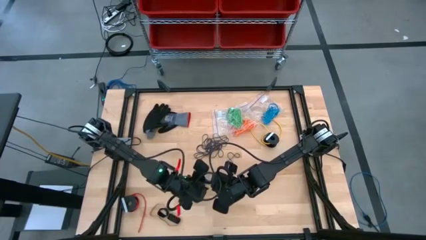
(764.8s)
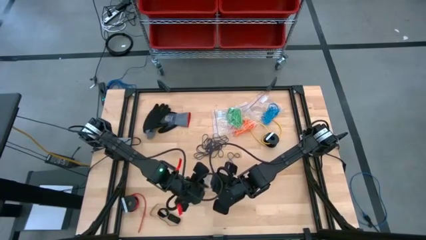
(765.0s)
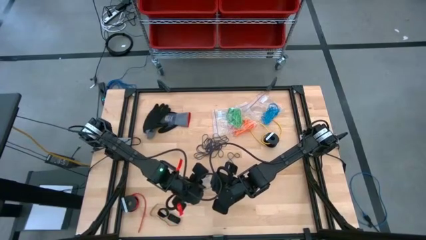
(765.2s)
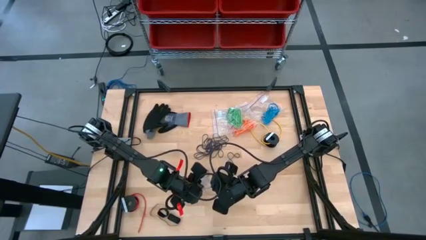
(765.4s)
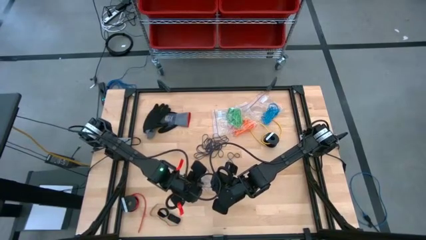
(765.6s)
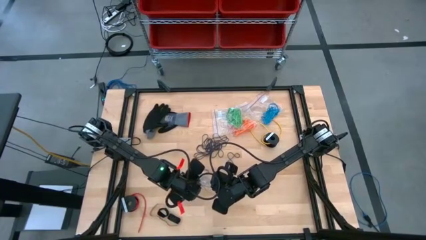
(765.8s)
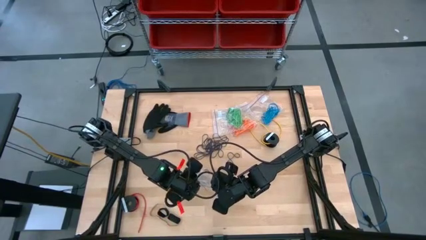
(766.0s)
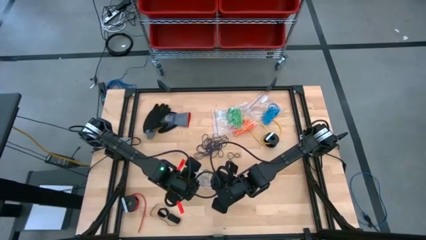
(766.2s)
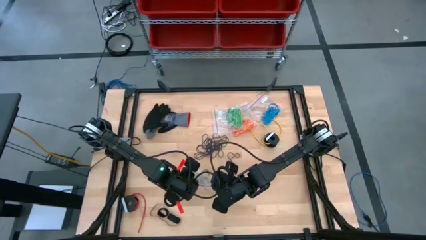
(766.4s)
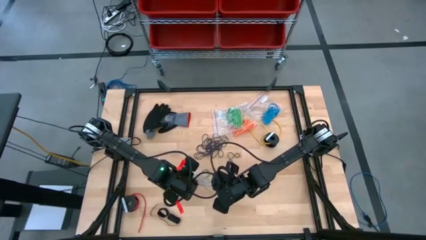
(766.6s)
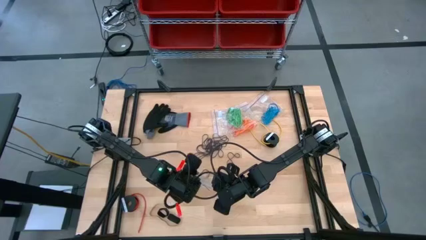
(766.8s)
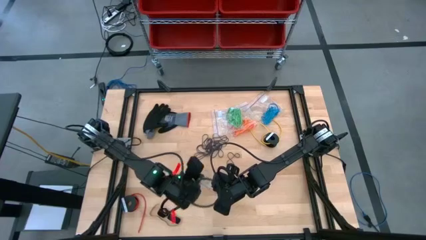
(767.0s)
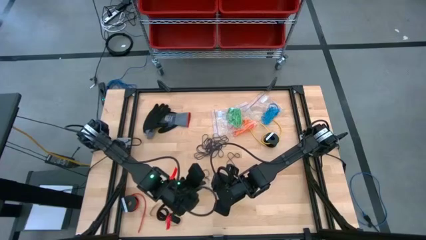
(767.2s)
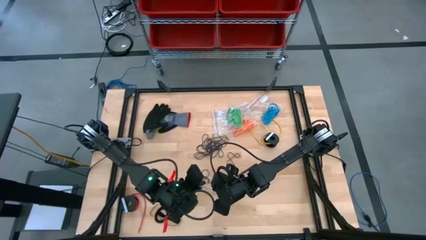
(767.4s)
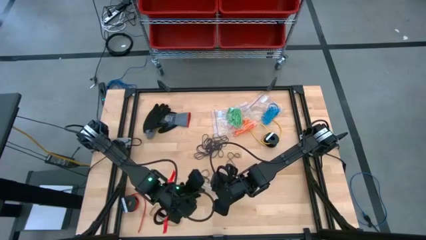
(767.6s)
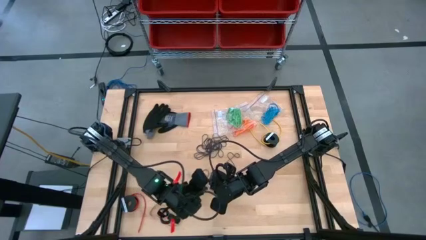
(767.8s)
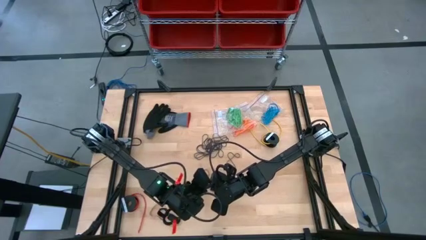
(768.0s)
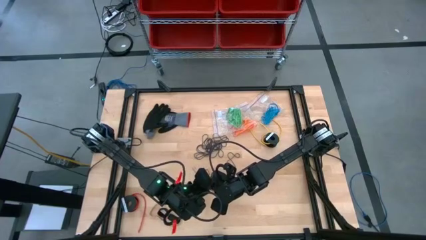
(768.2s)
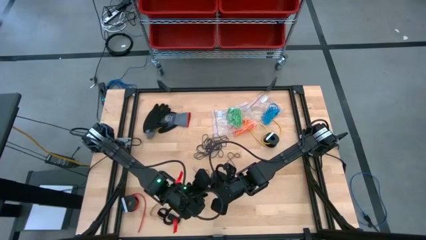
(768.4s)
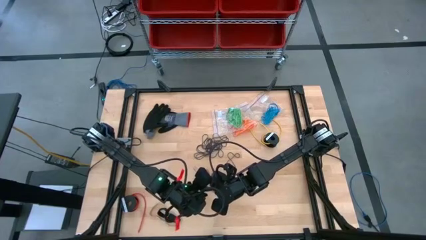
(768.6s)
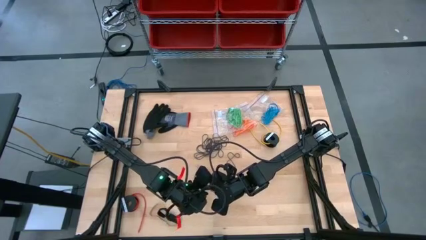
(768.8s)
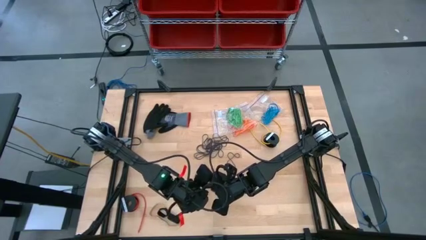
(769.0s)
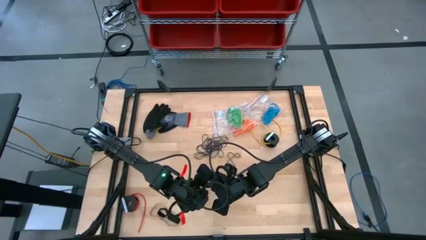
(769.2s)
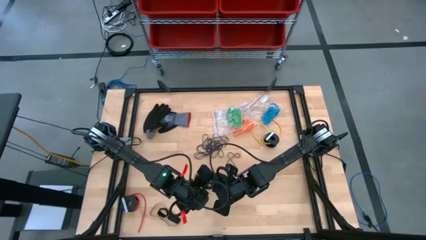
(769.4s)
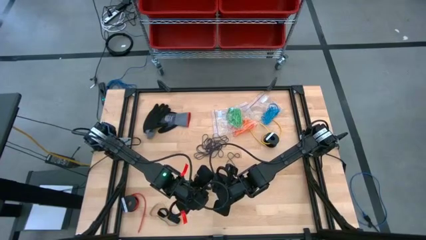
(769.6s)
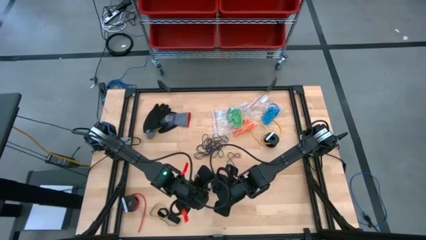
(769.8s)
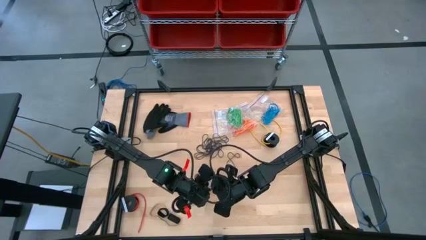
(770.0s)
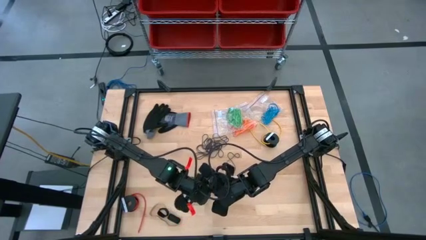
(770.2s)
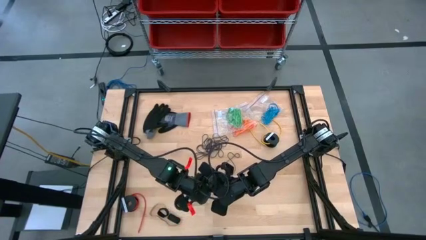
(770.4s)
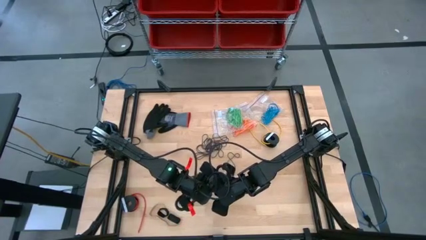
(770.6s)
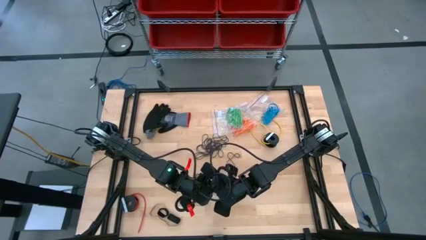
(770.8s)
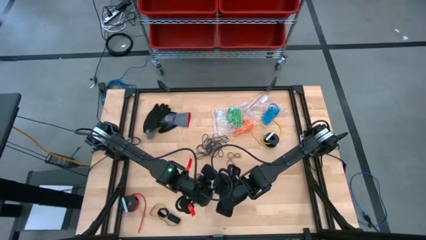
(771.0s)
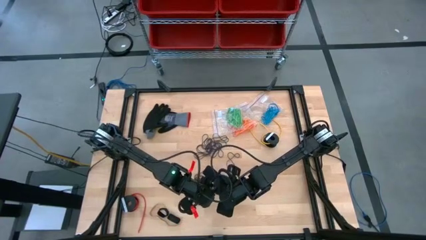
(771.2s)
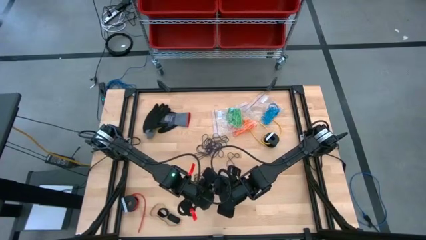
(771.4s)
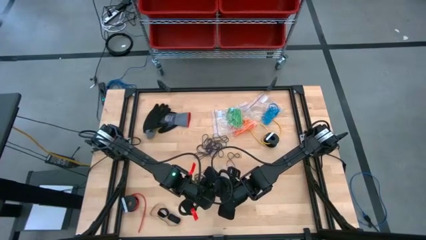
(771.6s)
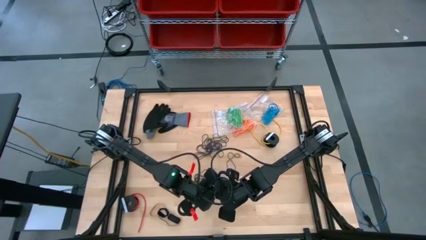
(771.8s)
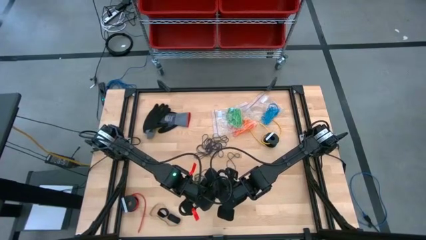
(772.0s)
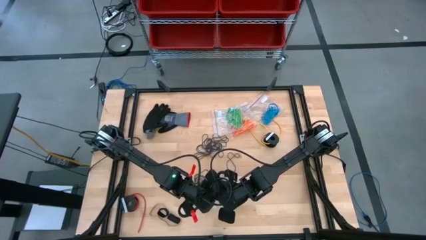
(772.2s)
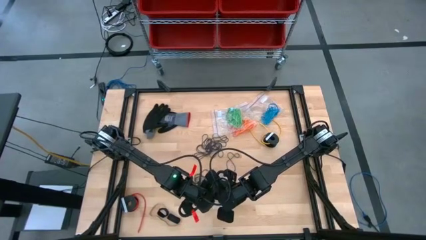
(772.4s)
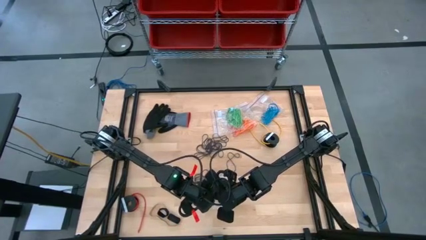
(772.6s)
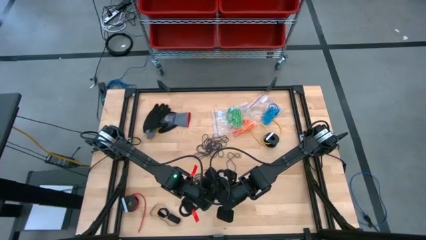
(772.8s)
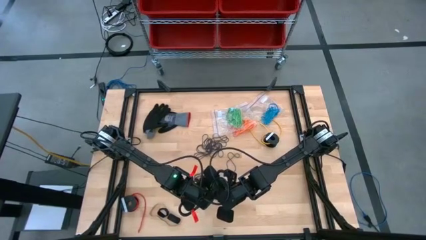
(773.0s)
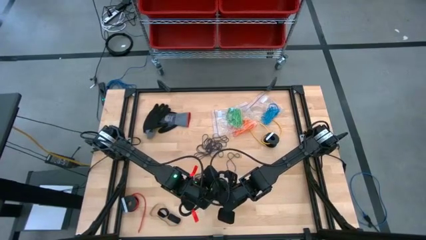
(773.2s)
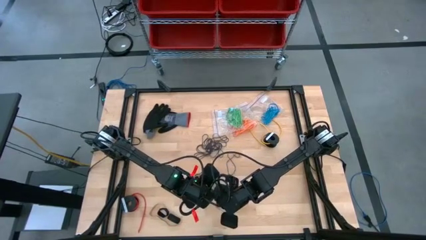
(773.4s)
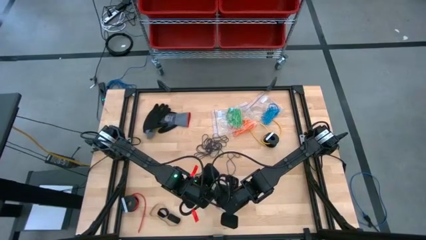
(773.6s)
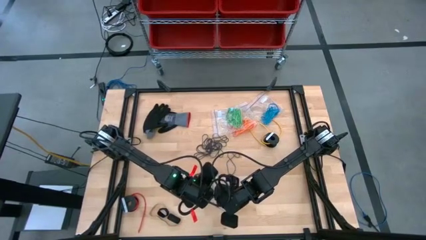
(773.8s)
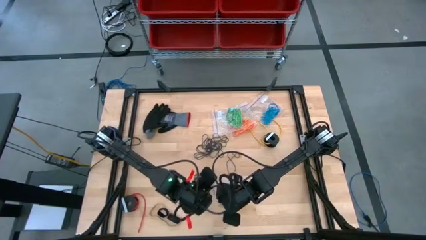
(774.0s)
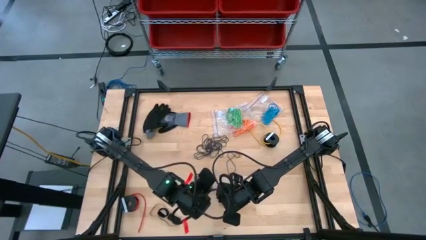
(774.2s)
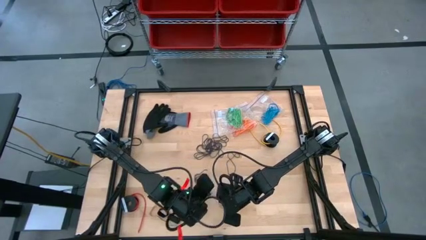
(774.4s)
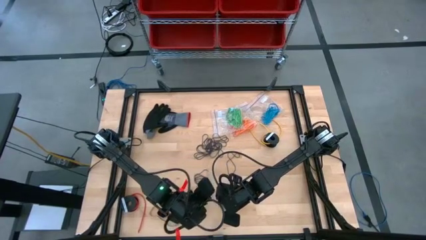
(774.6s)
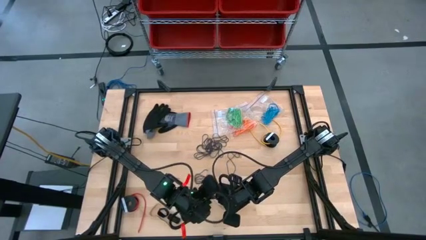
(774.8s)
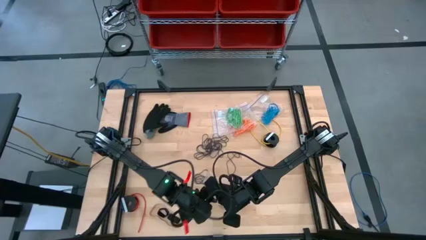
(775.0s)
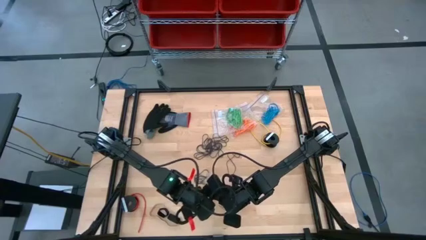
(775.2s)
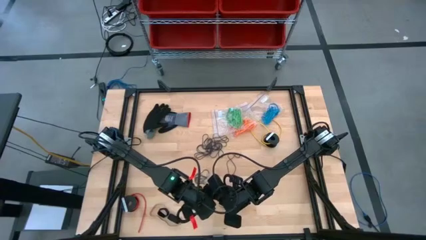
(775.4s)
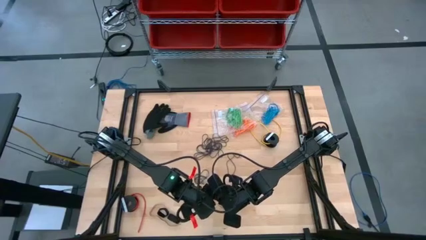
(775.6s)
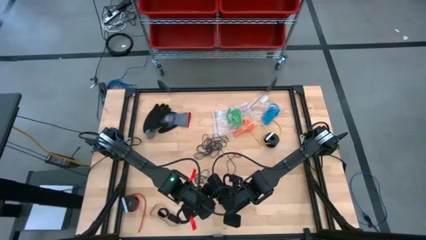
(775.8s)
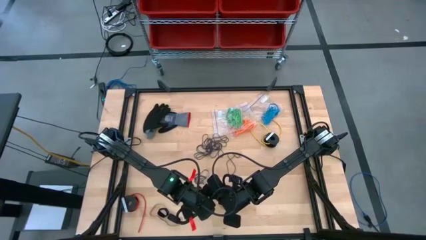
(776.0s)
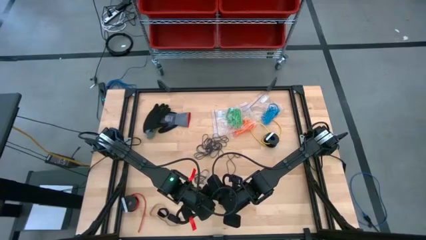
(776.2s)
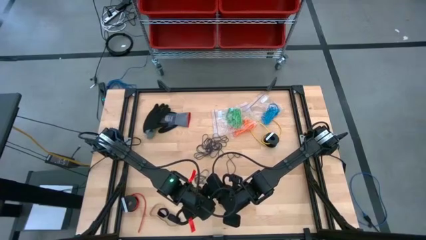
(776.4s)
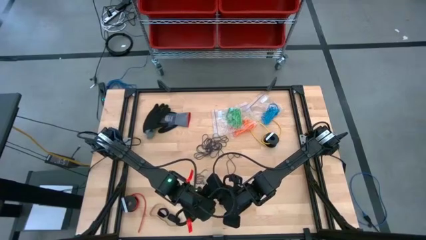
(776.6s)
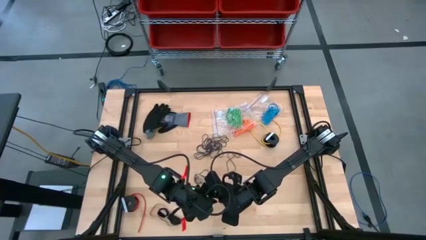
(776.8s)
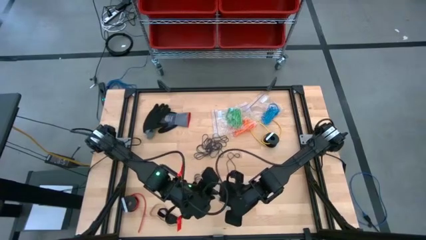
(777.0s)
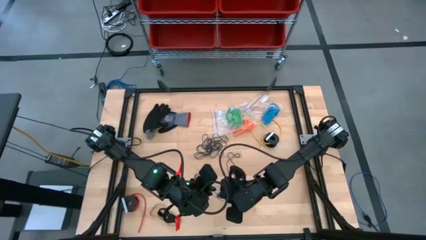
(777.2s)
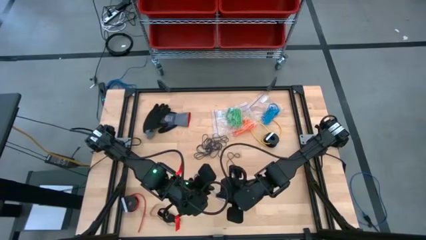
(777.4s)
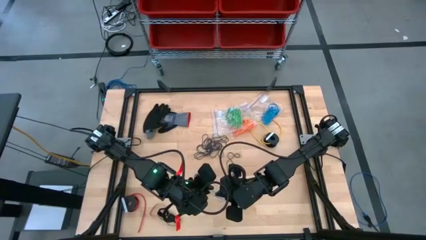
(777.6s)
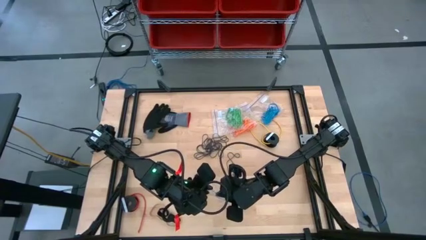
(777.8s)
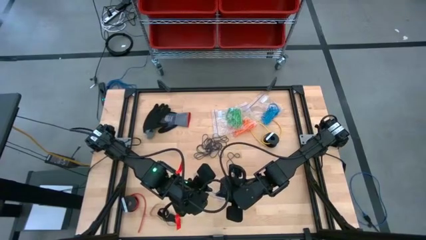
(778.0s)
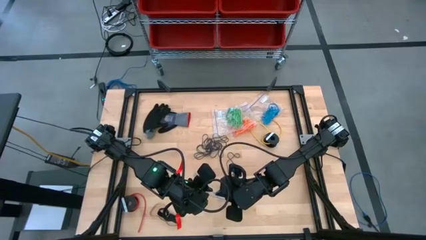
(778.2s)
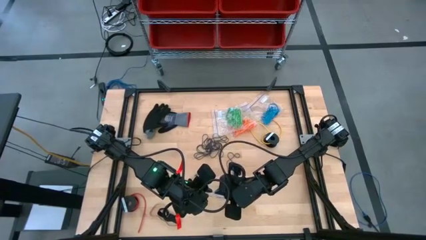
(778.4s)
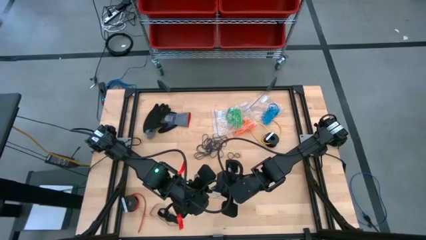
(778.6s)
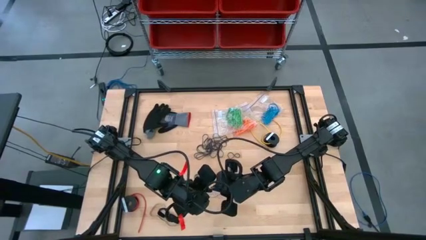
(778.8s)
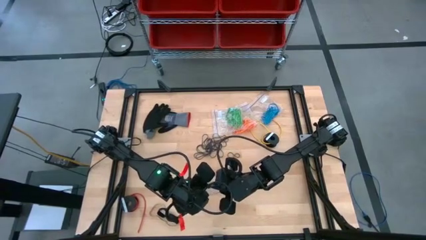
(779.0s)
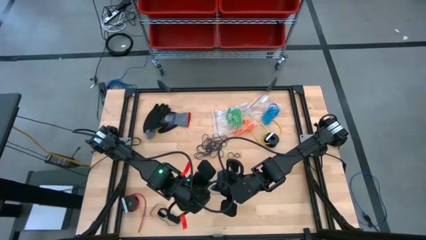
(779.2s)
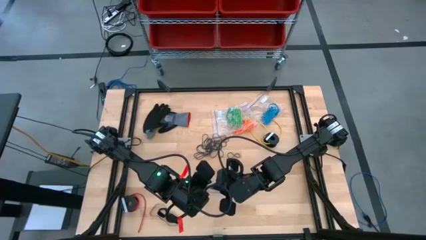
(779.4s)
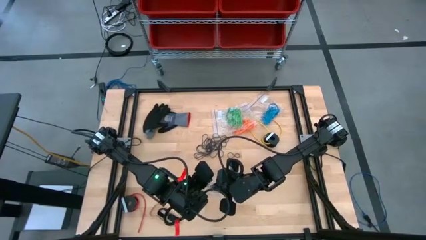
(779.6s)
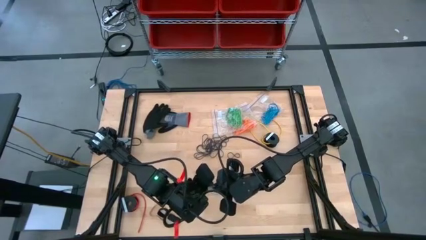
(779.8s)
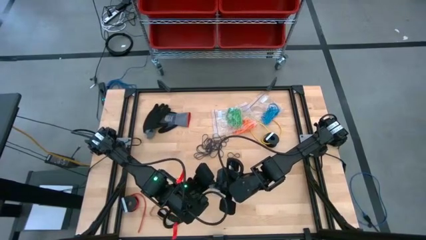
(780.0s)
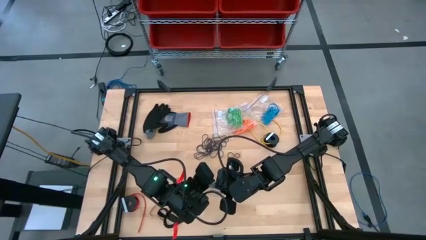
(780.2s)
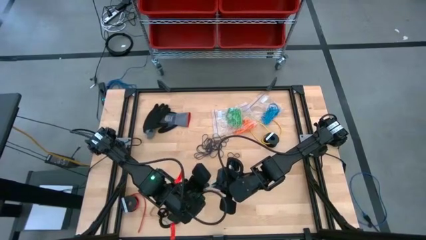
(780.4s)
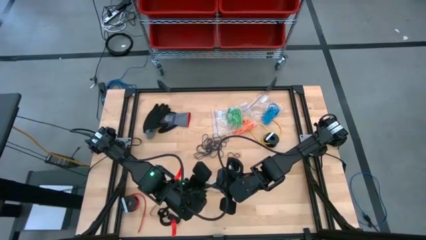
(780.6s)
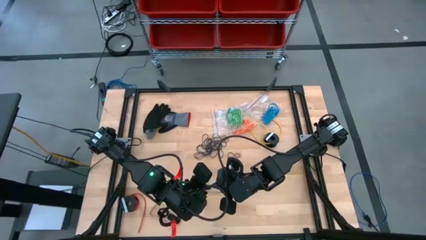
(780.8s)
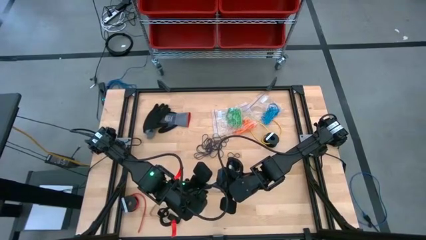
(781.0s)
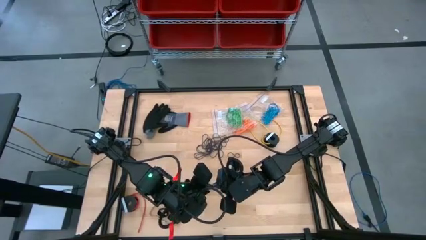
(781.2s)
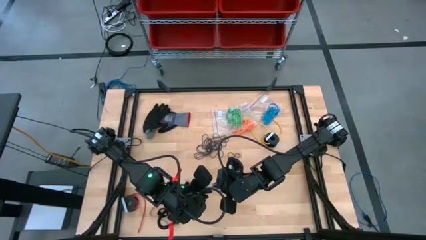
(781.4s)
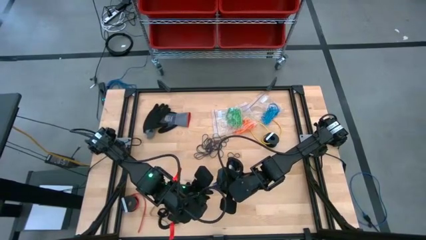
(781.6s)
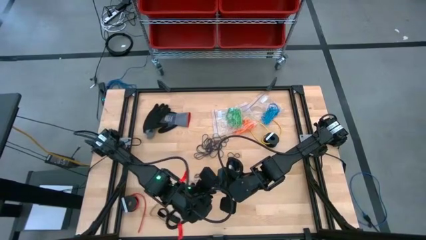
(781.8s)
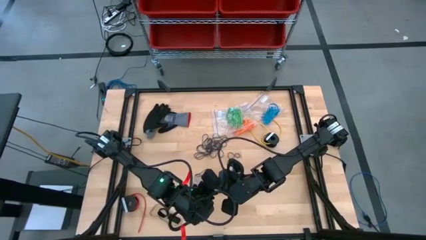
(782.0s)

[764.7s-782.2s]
Task: Sort rubber bands
Open the transparent zip bag
